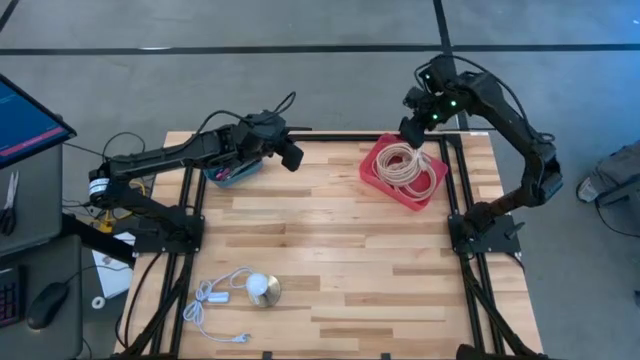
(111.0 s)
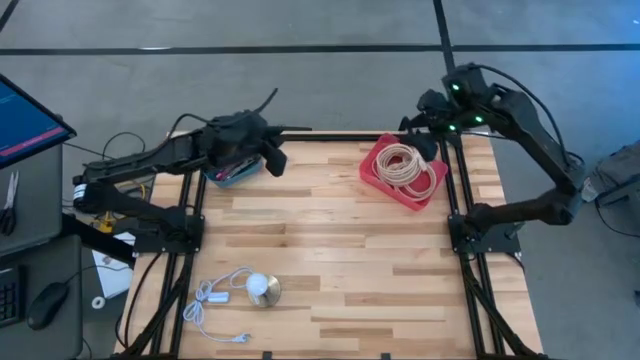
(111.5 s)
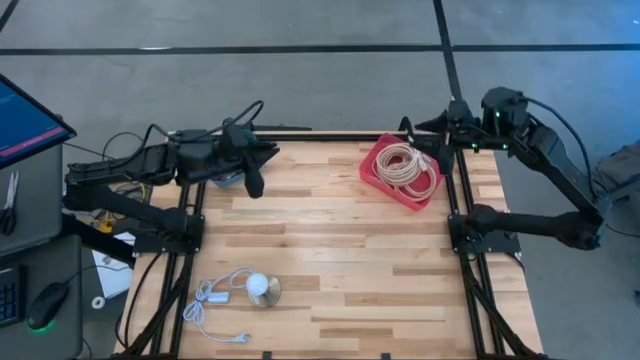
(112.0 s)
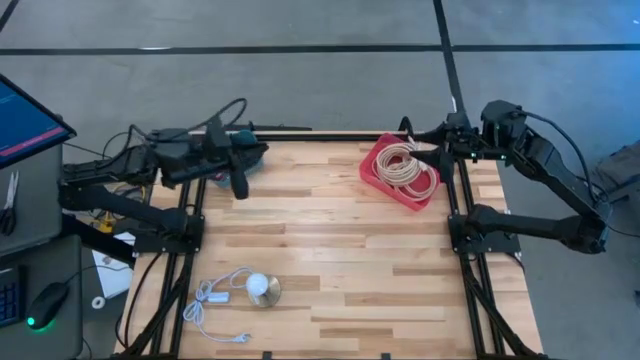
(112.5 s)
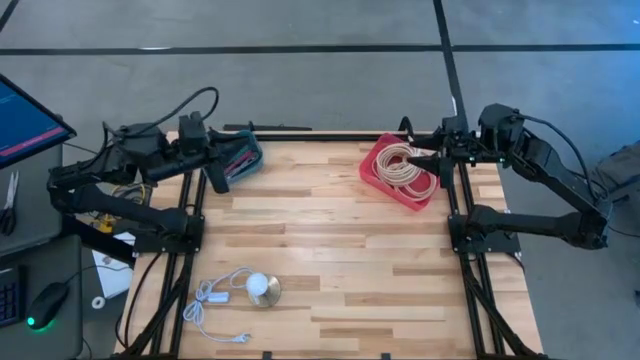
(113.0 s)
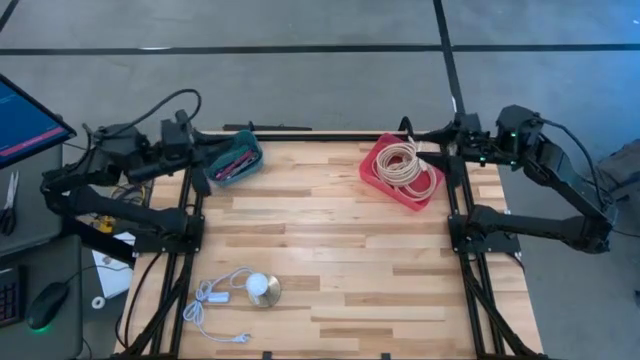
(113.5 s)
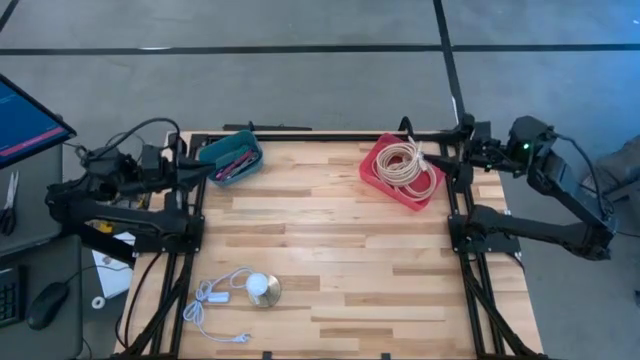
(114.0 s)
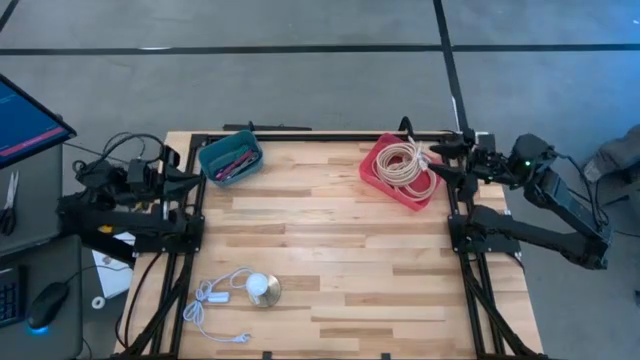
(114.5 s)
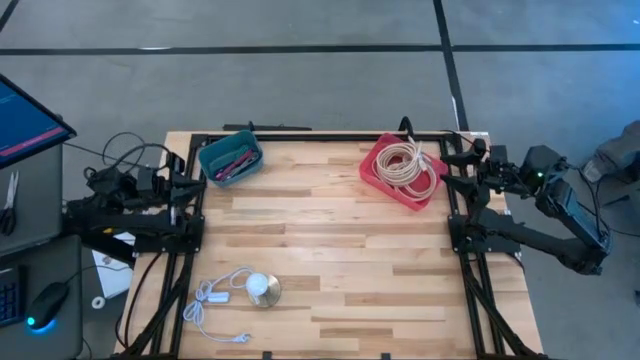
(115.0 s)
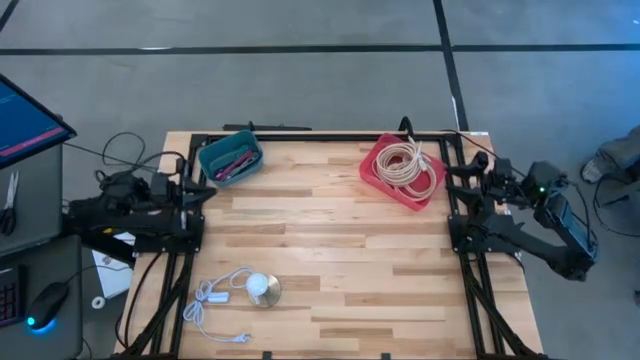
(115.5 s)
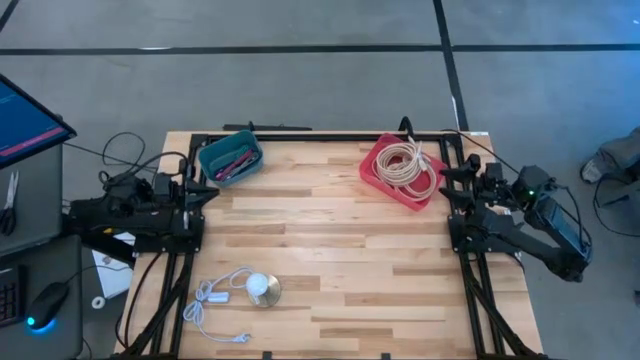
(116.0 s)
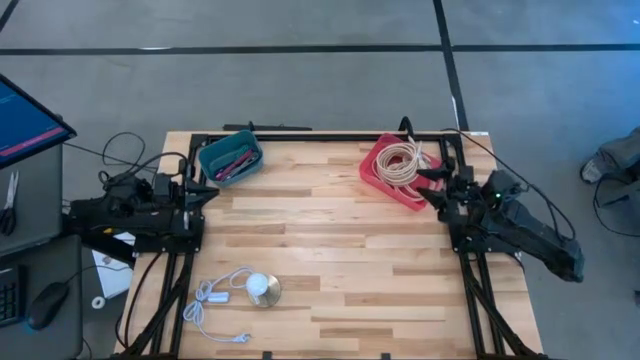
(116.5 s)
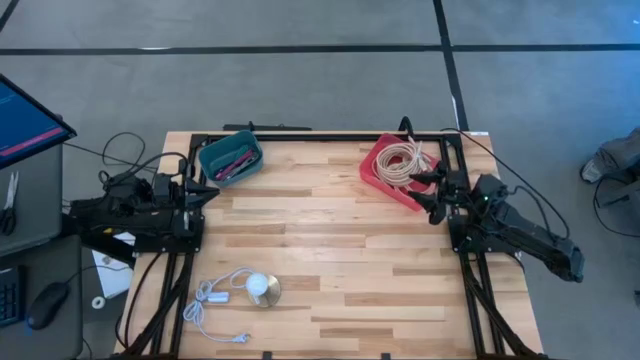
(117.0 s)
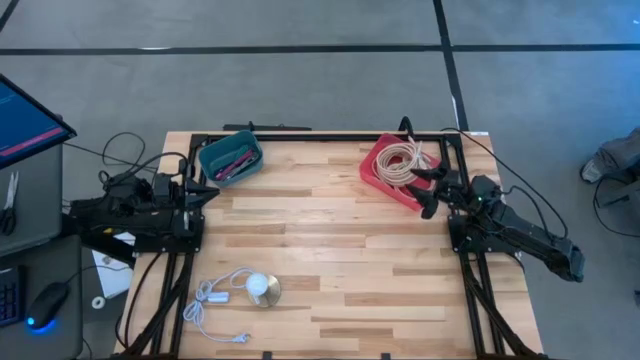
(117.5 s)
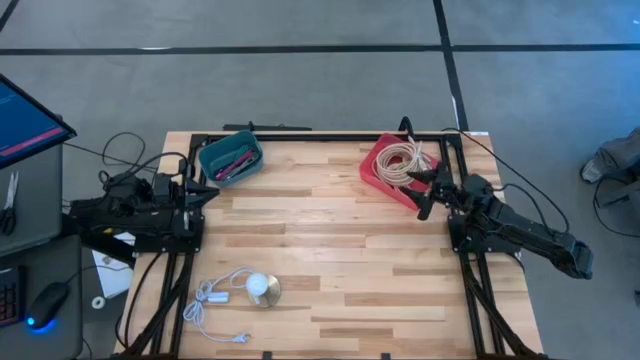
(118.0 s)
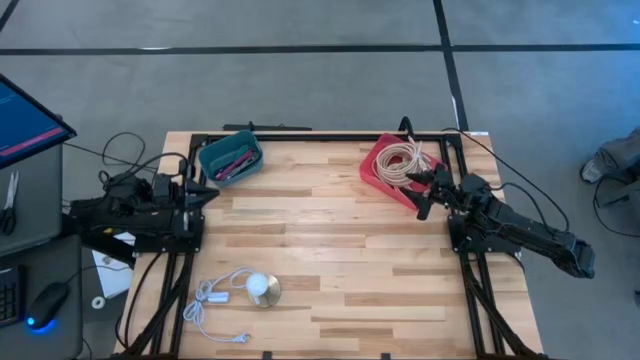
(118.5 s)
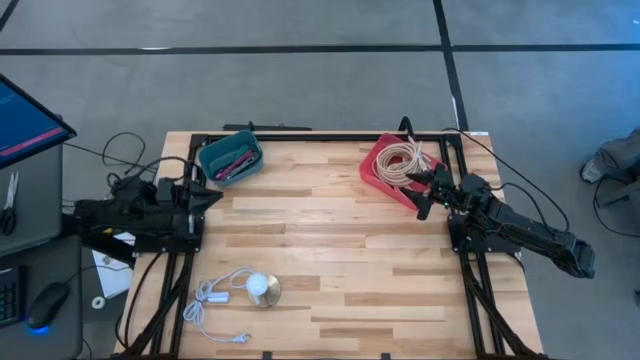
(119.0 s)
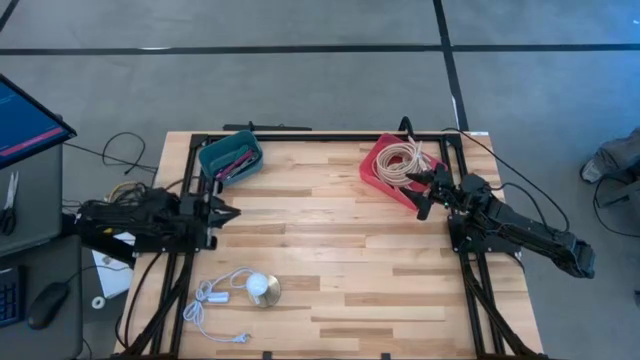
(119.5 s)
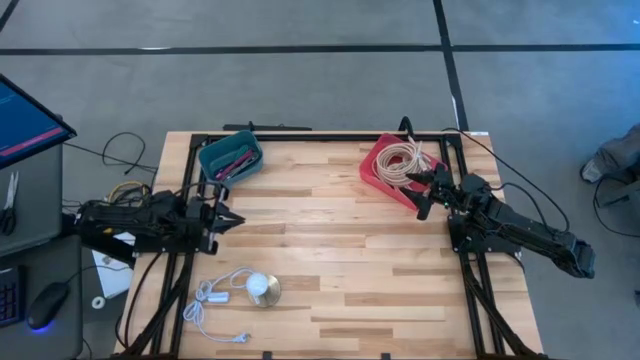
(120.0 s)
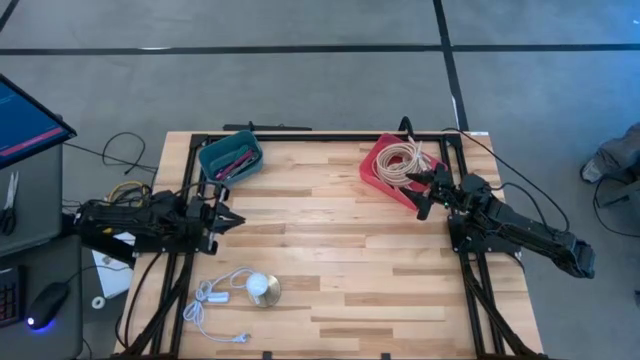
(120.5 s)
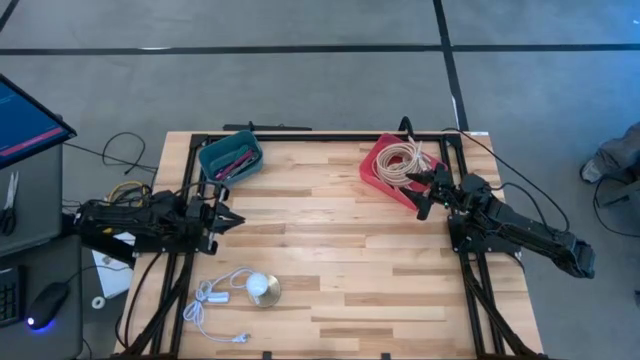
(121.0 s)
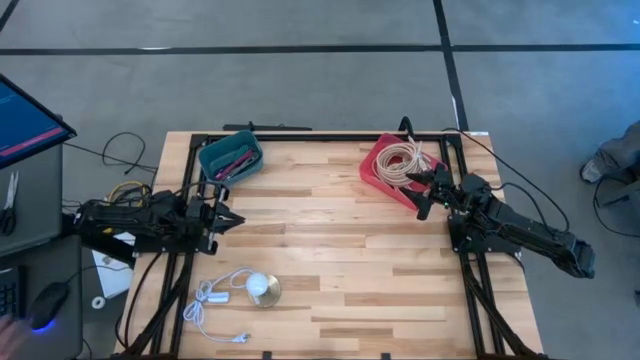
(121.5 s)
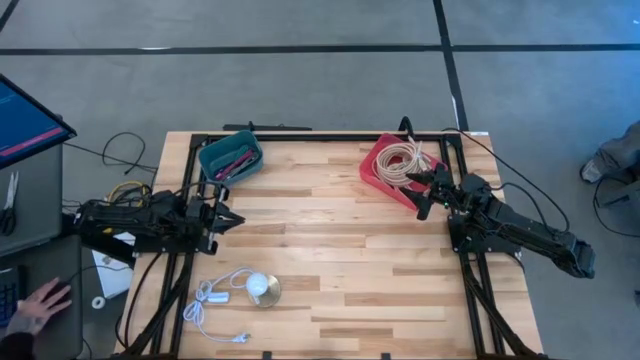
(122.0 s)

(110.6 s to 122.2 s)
Task: Pick & Place USB Port
Return to home position

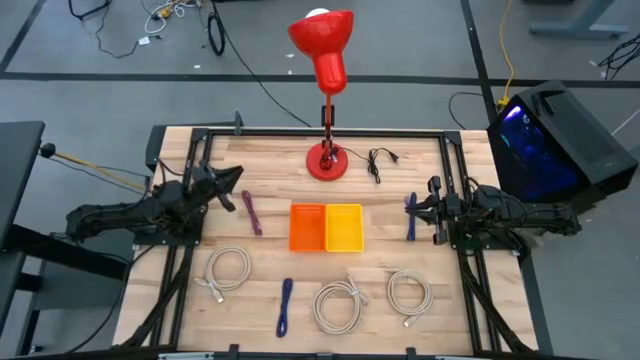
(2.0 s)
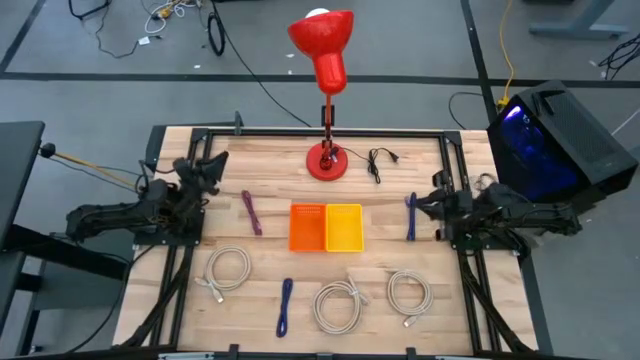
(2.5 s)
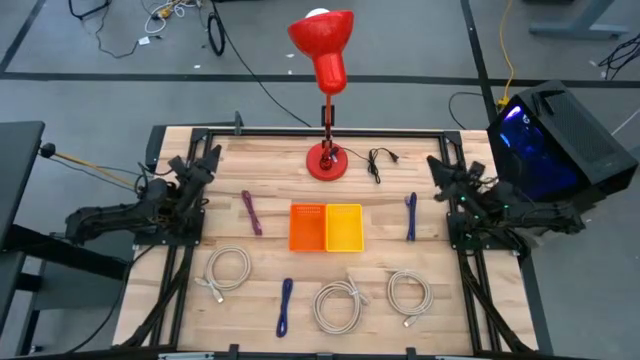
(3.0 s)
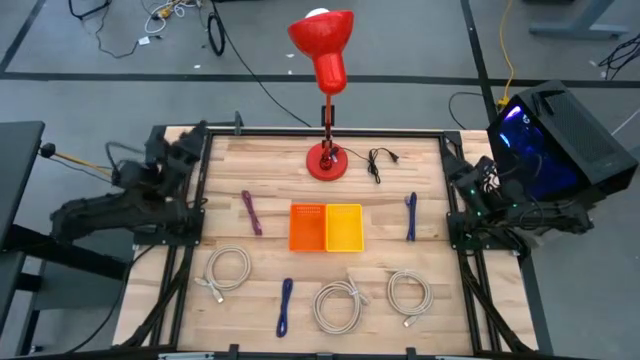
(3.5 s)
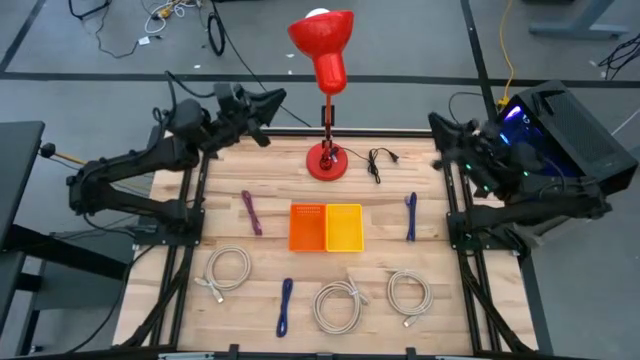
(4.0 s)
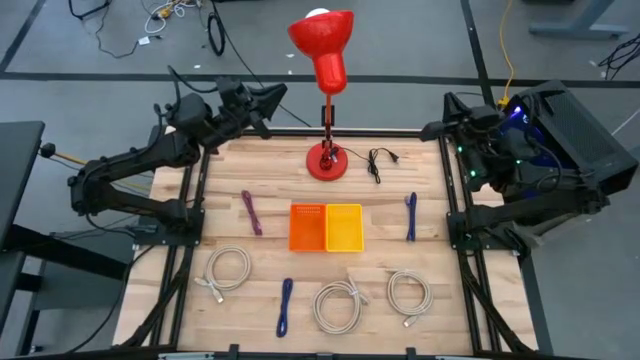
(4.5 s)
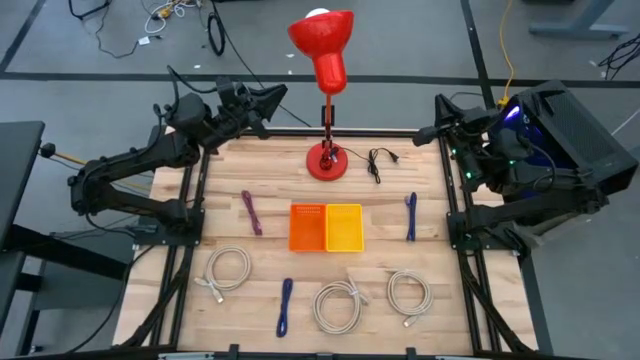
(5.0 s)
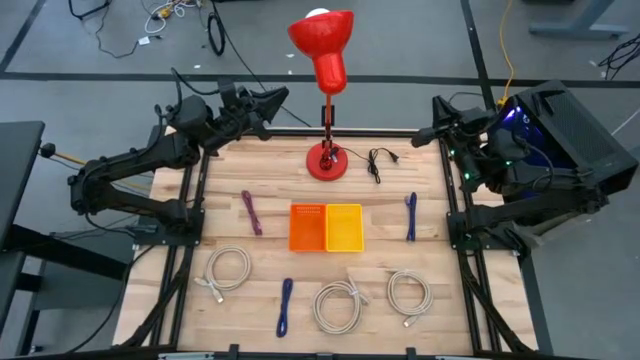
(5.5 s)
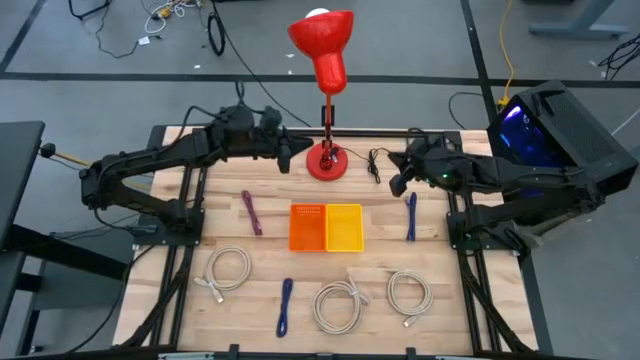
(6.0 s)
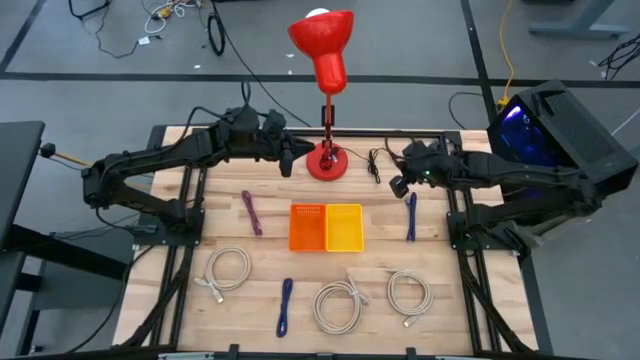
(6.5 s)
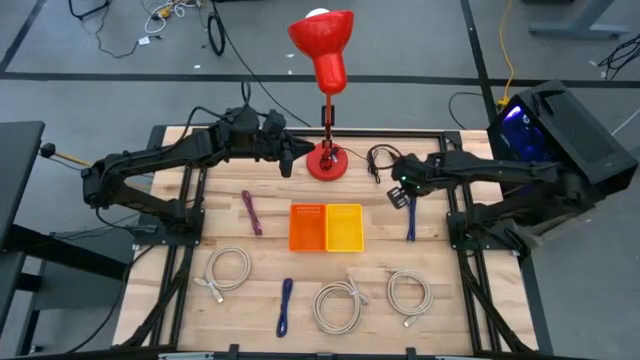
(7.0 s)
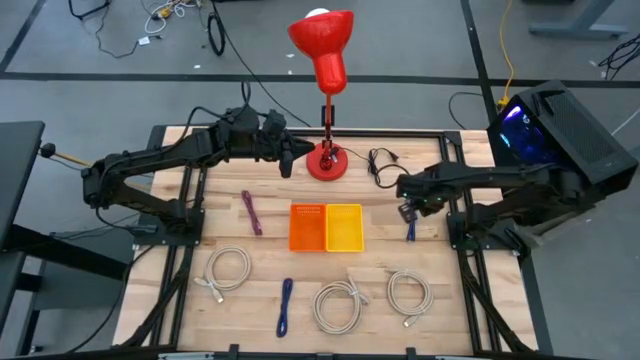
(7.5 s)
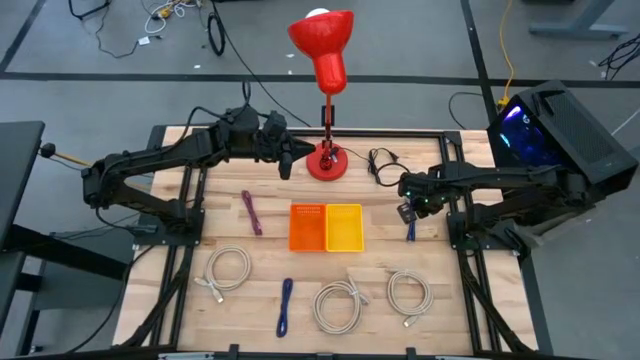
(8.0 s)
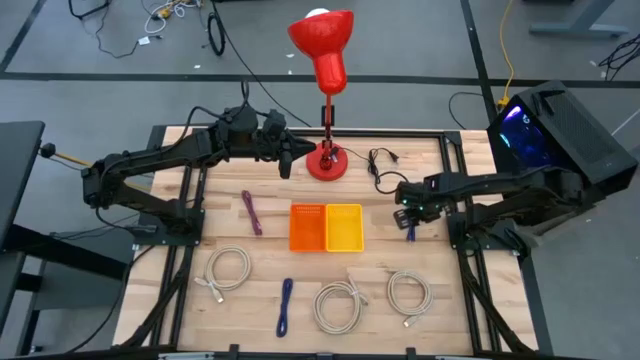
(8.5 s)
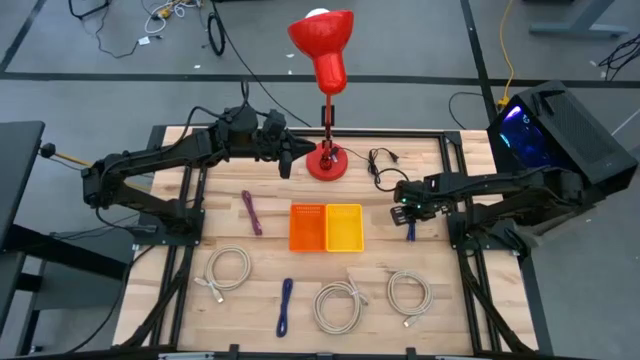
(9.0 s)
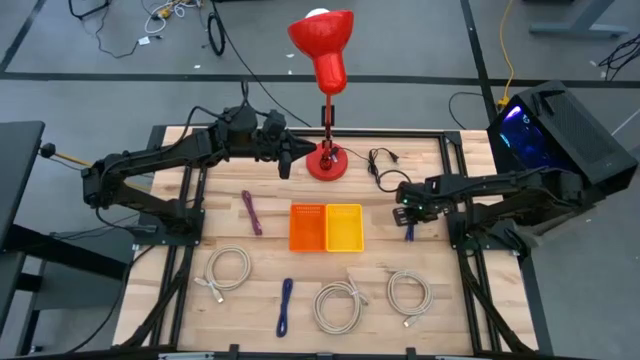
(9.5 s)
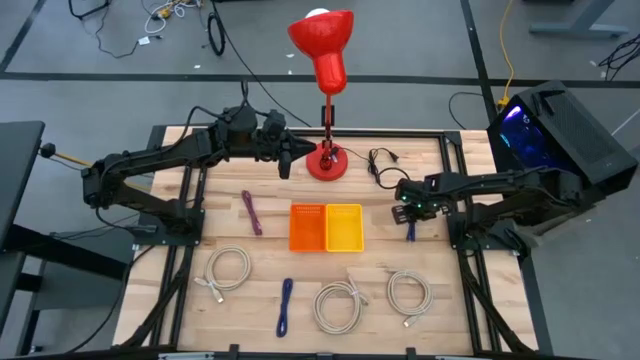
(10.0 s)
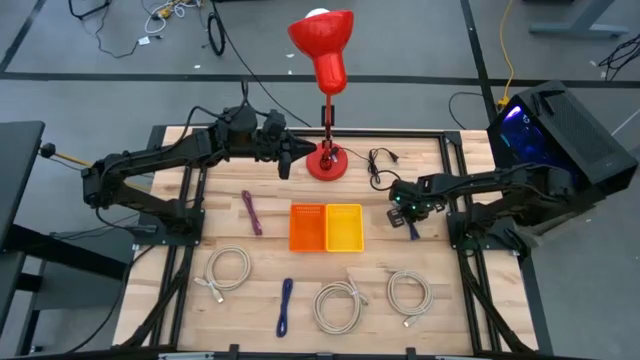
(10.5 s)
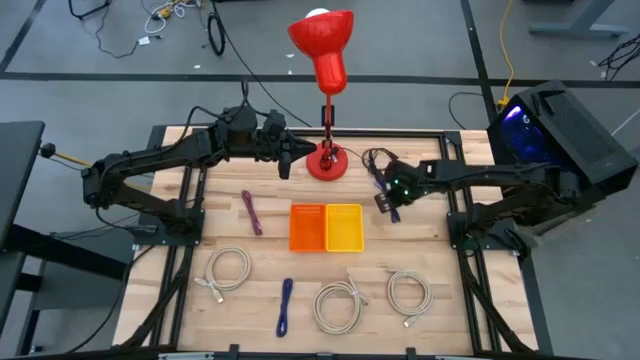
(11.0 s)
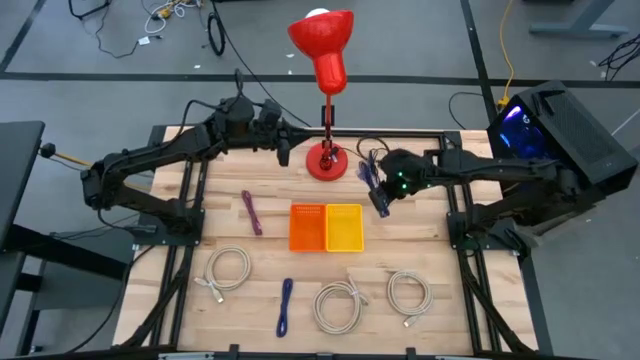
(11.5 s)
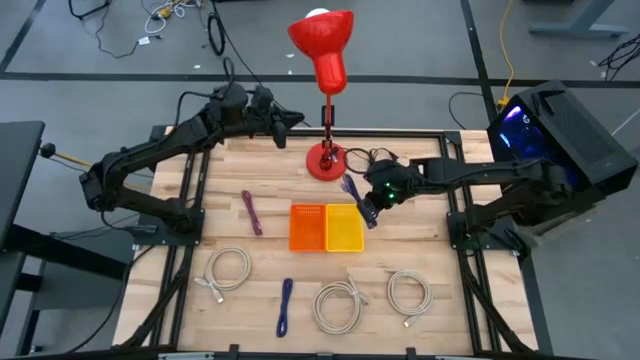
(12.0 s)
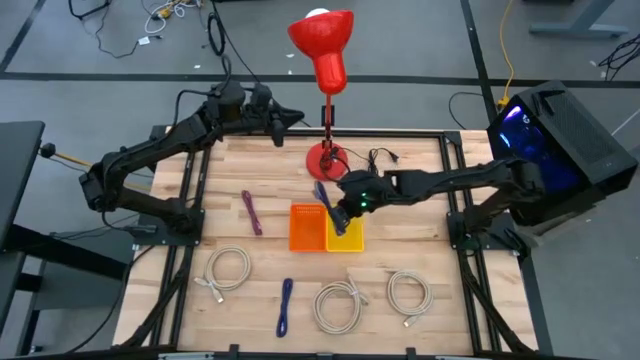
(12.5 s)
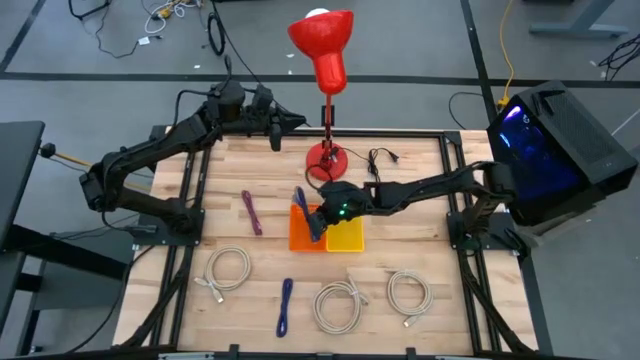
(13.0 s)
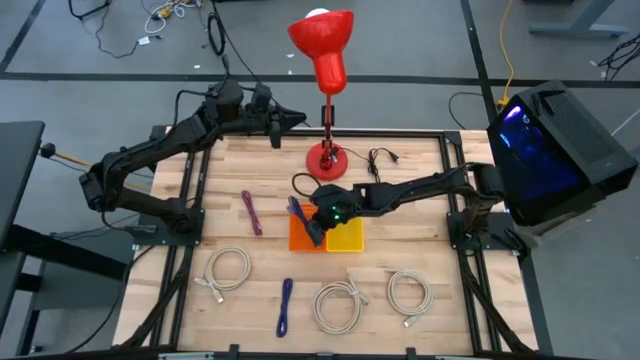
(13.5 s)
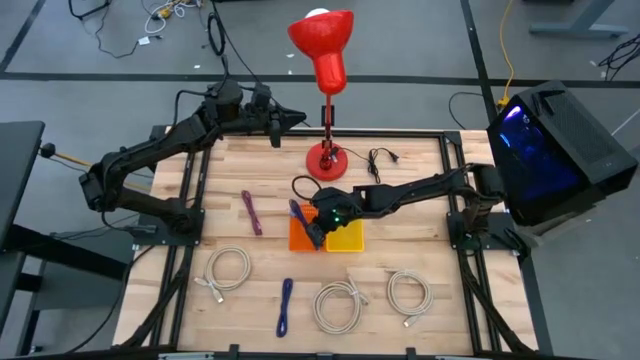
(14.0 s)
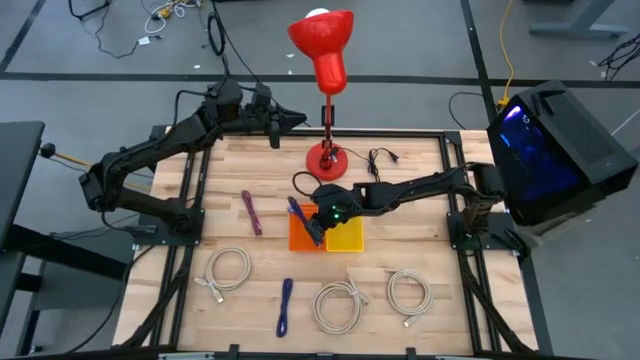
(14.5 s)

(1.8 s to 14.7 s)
Task: Pick & Place USB Port
Put the top blue and black charger cable into the orange bin
